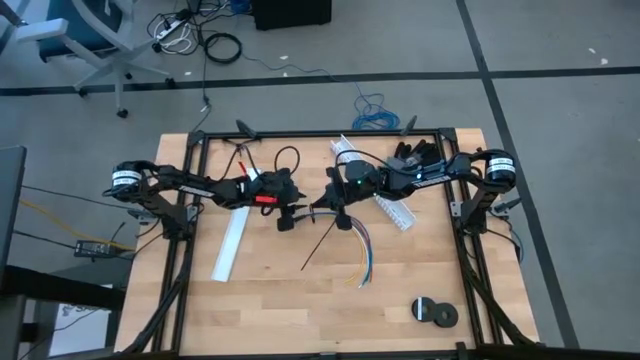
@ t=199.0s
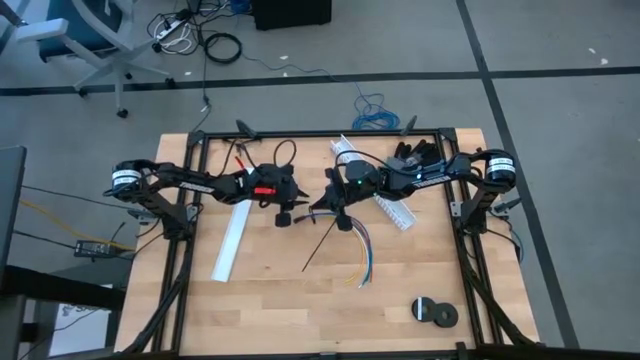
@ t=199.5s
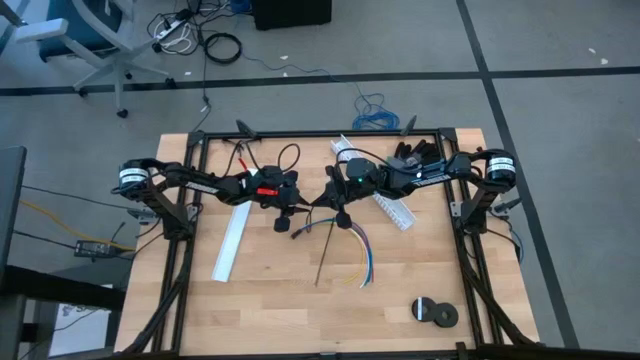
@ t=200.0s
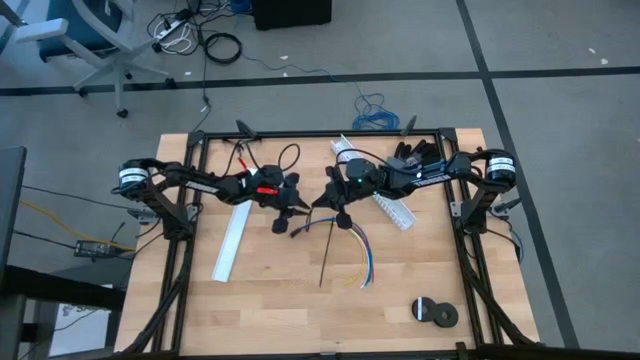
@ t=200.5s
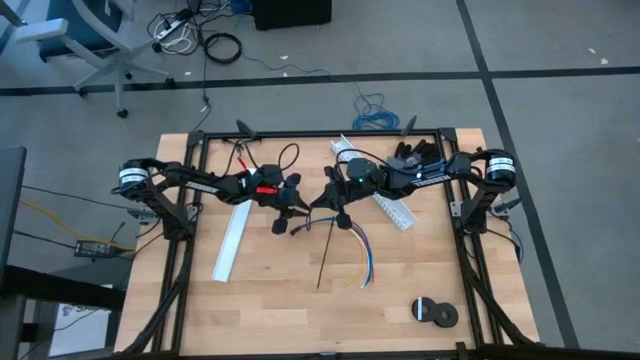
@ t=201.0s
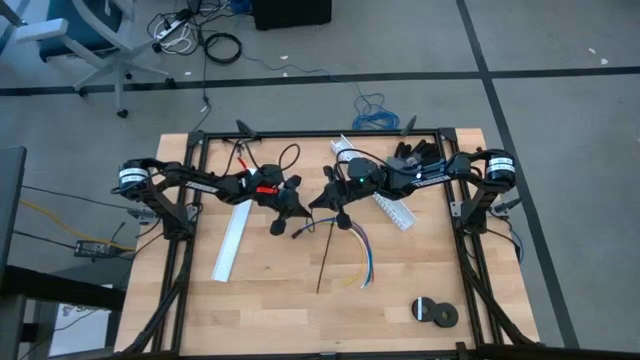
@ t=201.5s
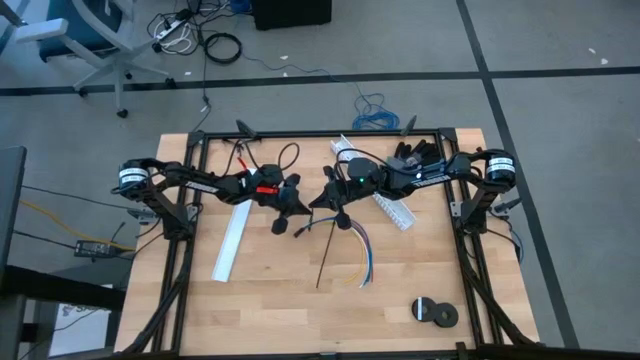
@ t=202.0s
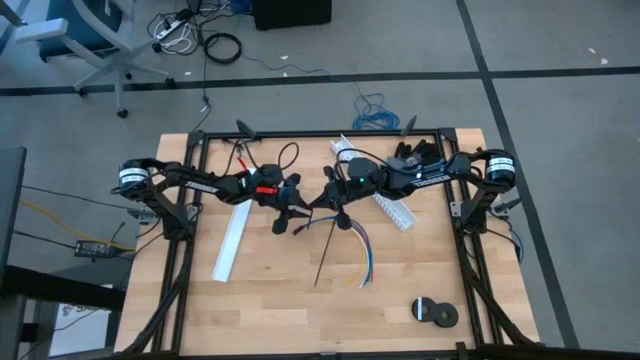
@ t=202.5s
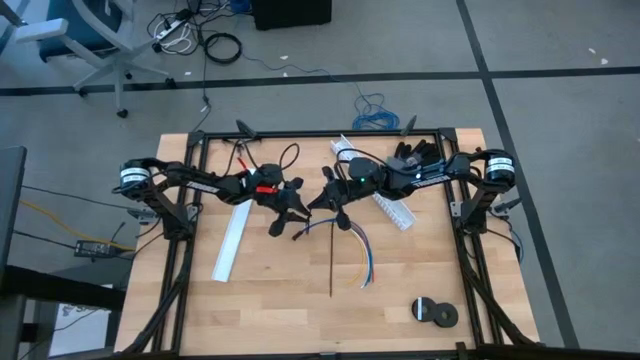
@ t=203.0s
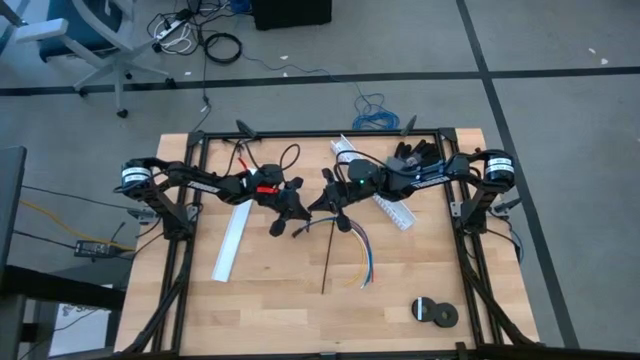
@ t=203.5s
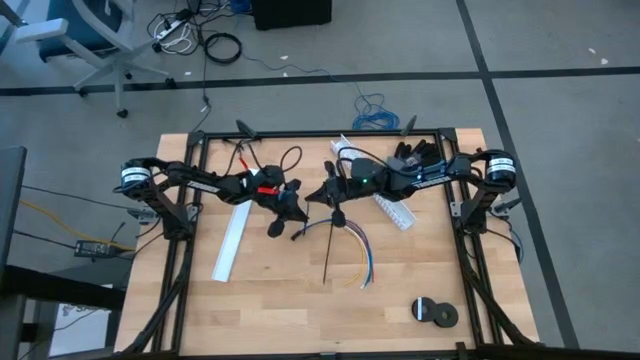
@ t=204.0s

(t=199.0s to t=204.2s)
Task: Ziptie cables
Wrap the cable wires with black zip tie

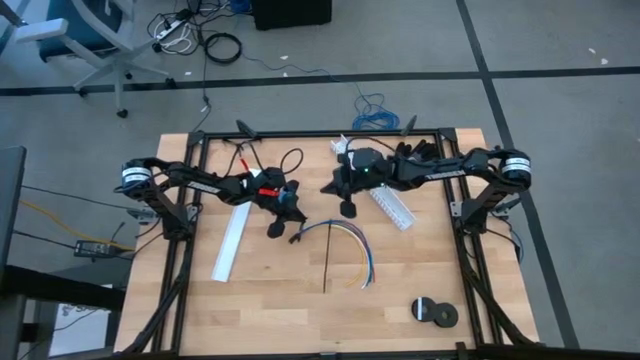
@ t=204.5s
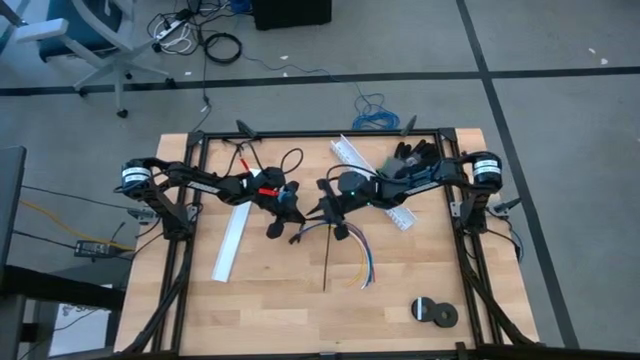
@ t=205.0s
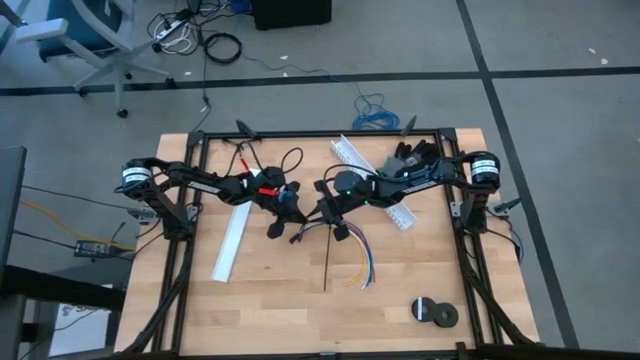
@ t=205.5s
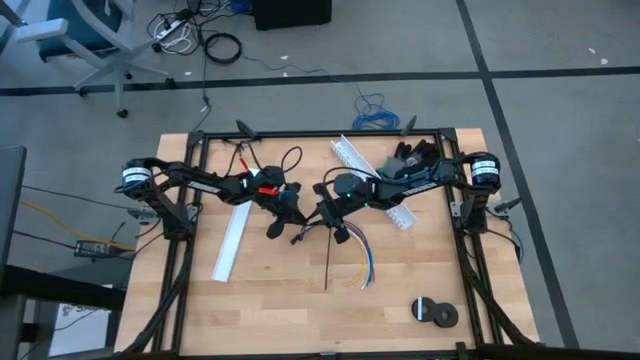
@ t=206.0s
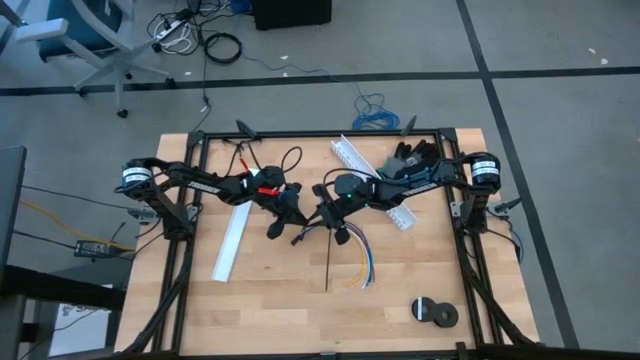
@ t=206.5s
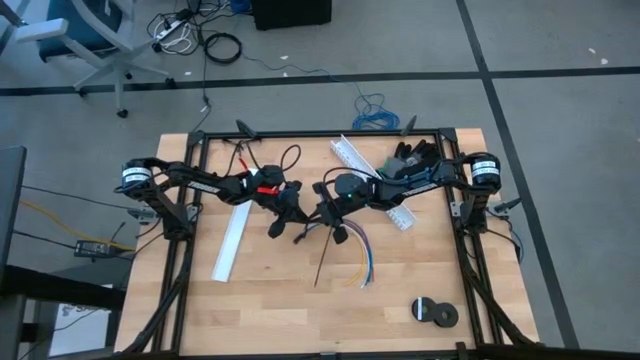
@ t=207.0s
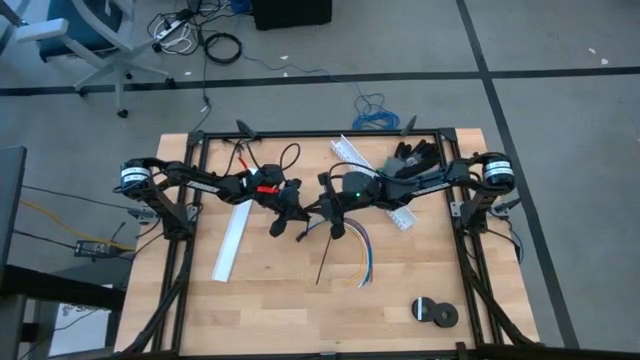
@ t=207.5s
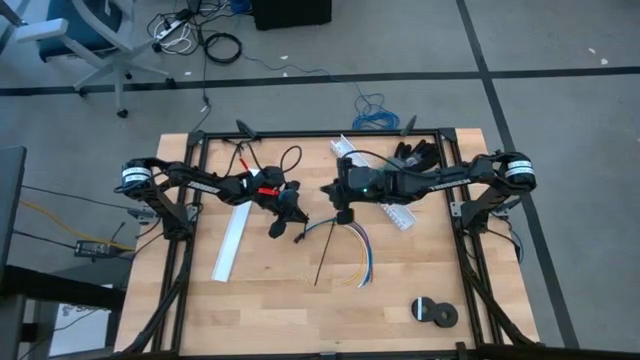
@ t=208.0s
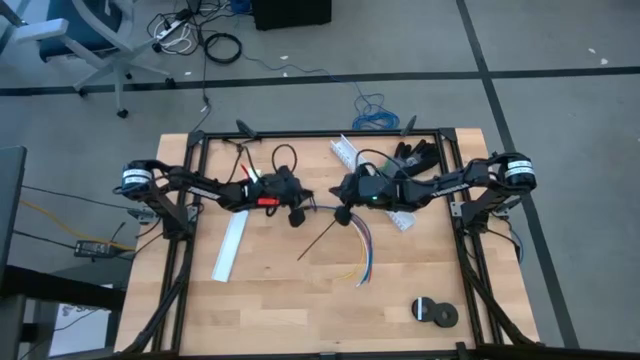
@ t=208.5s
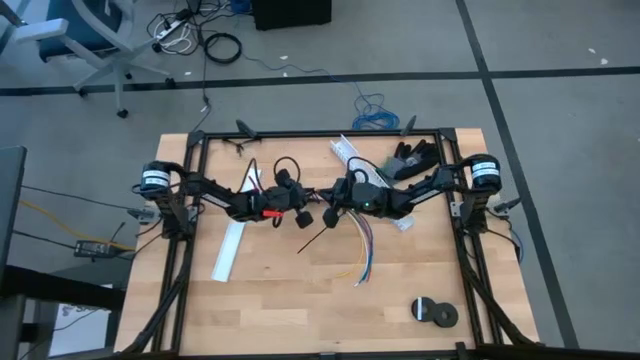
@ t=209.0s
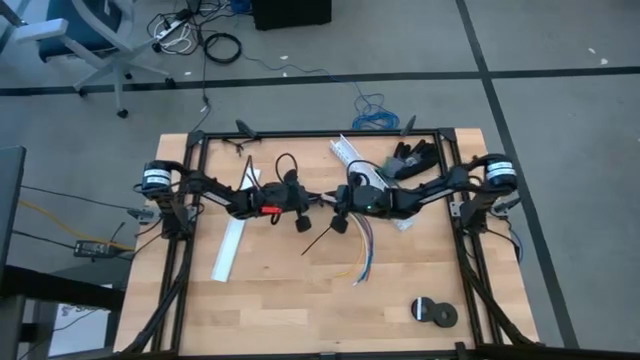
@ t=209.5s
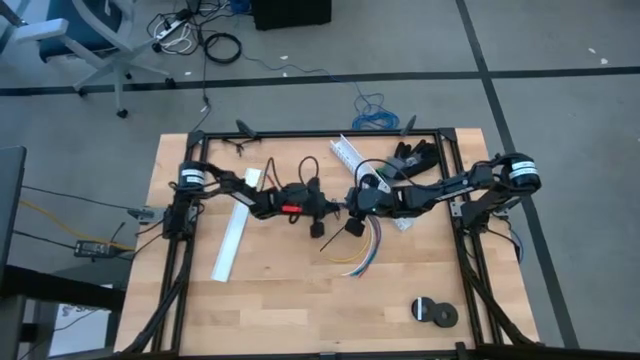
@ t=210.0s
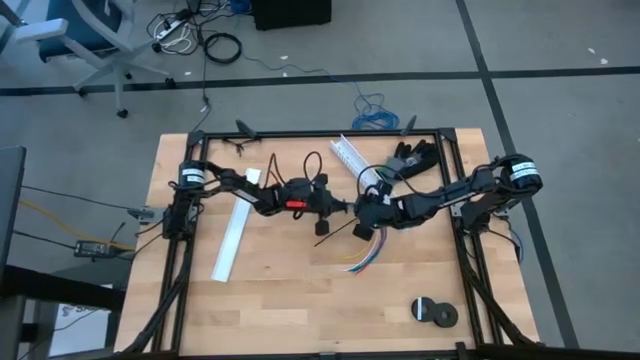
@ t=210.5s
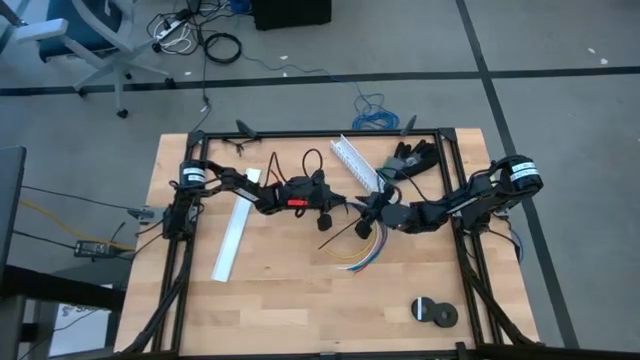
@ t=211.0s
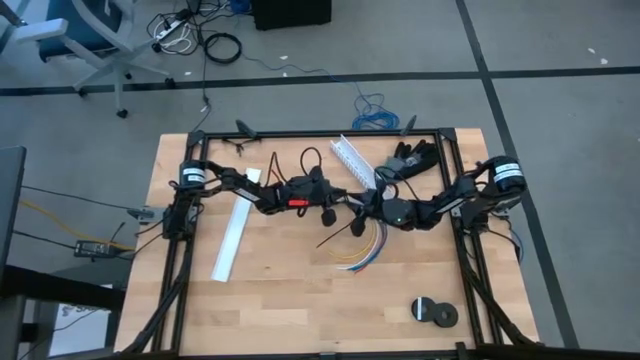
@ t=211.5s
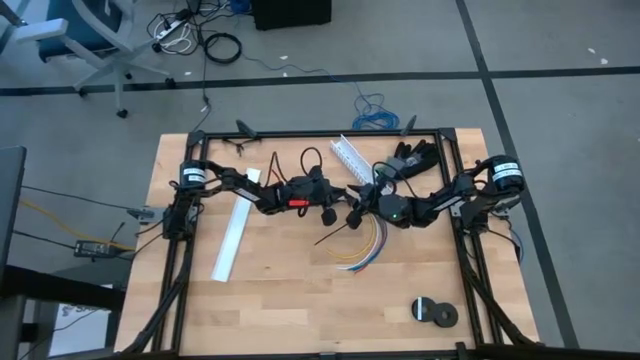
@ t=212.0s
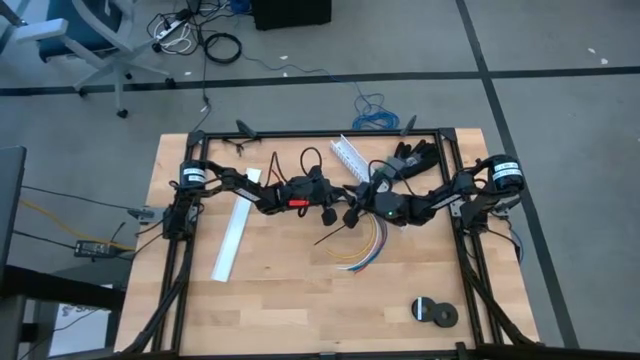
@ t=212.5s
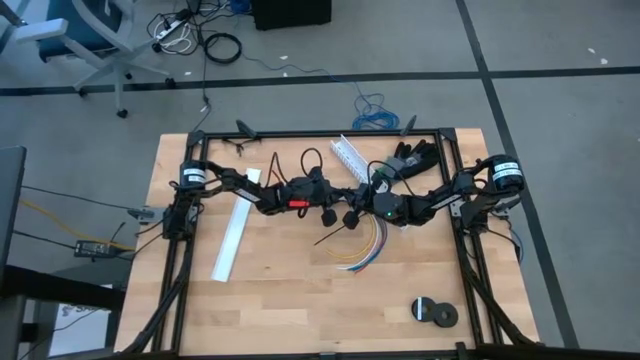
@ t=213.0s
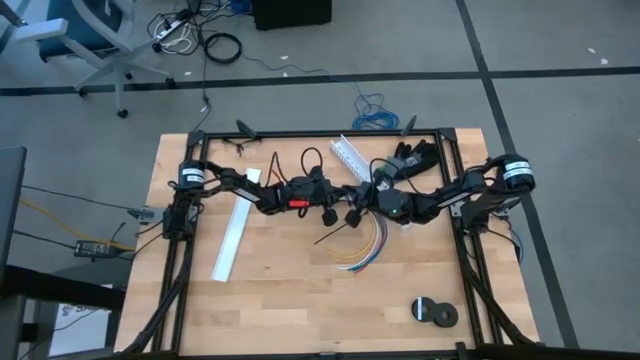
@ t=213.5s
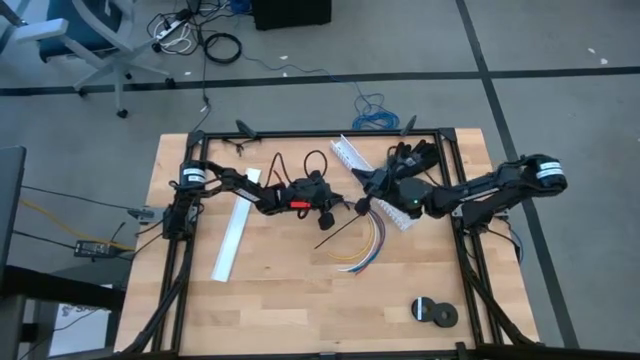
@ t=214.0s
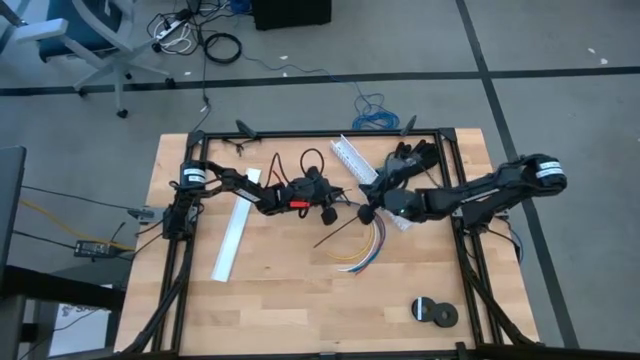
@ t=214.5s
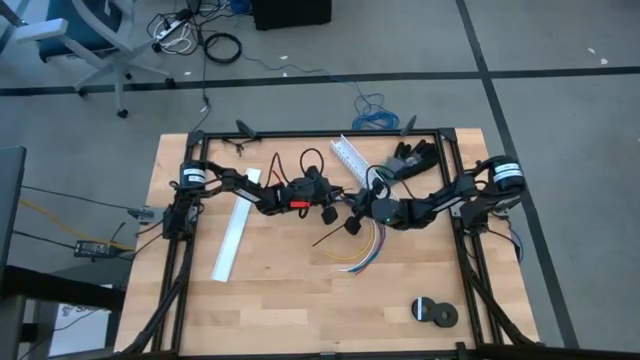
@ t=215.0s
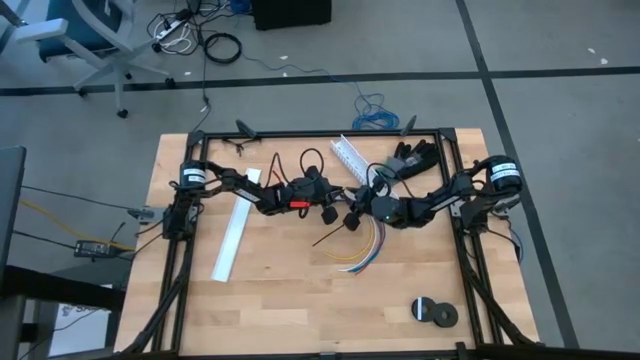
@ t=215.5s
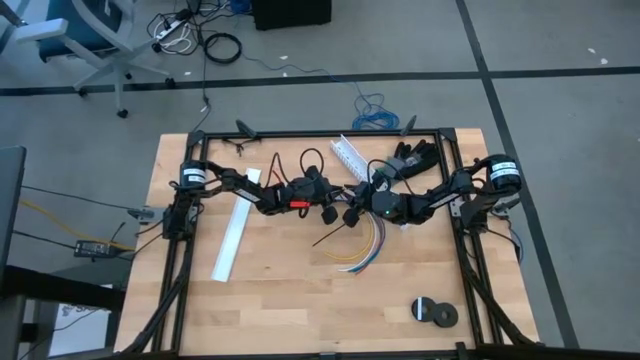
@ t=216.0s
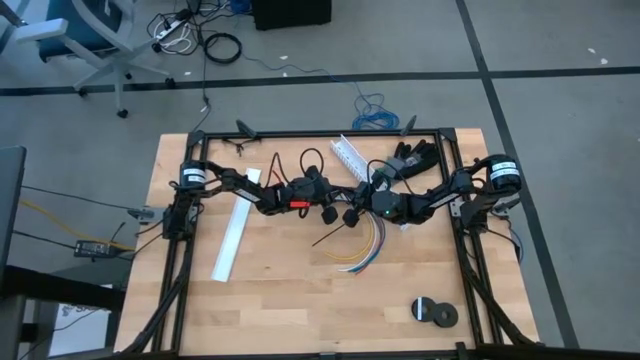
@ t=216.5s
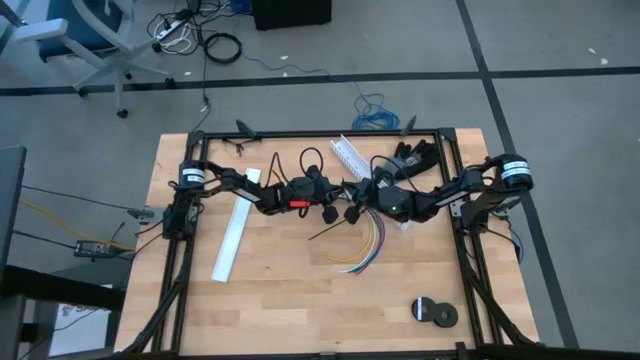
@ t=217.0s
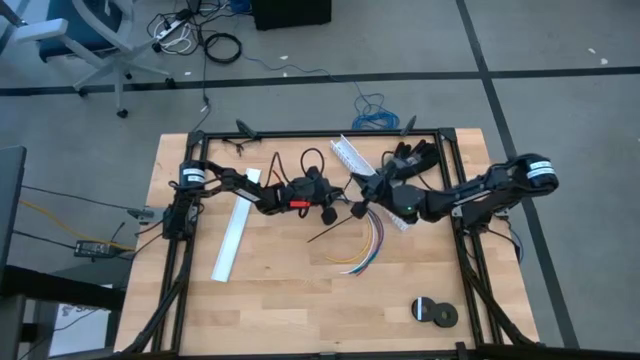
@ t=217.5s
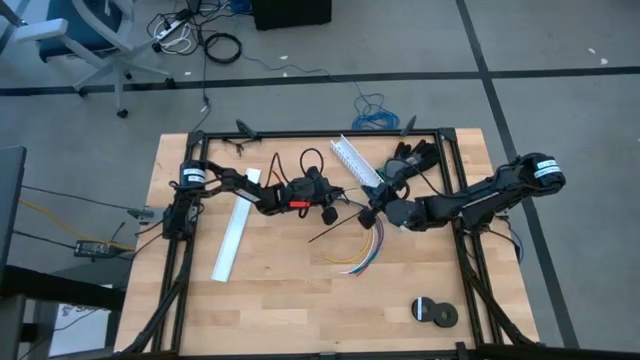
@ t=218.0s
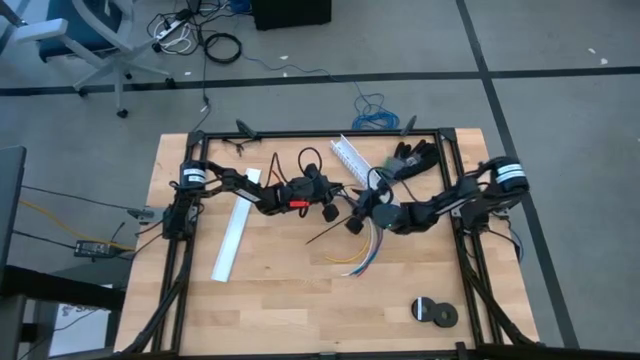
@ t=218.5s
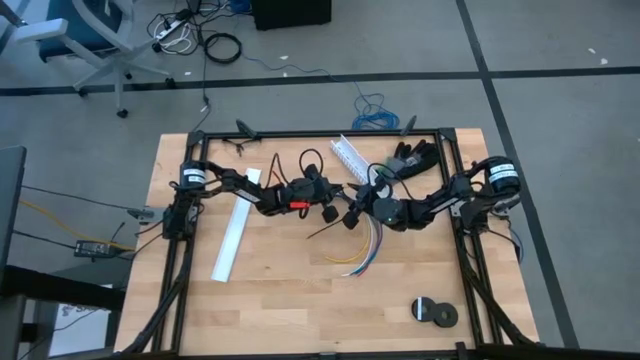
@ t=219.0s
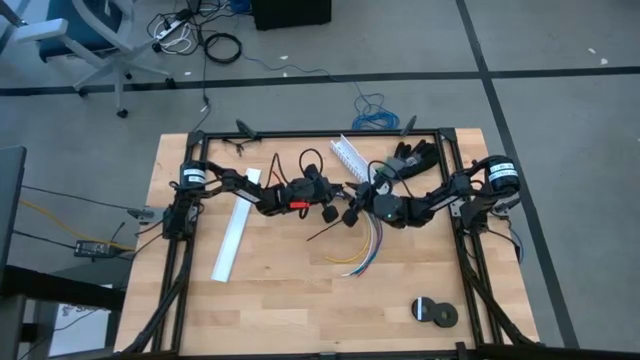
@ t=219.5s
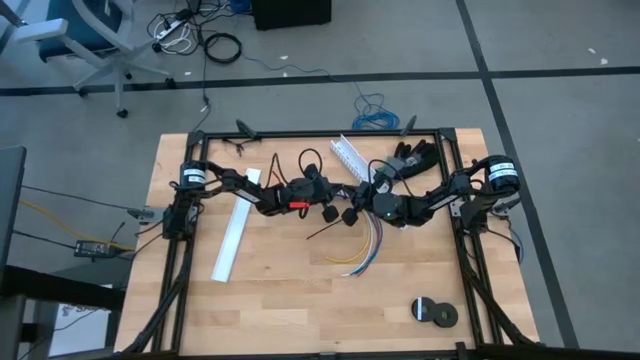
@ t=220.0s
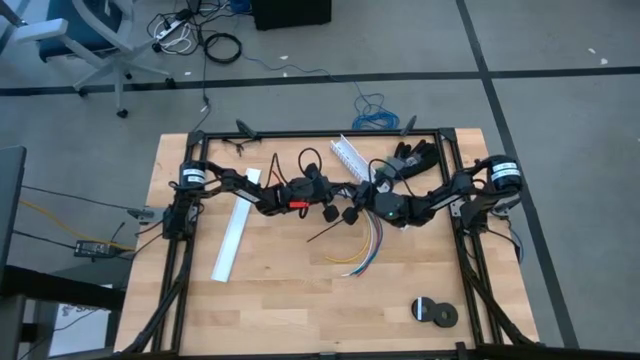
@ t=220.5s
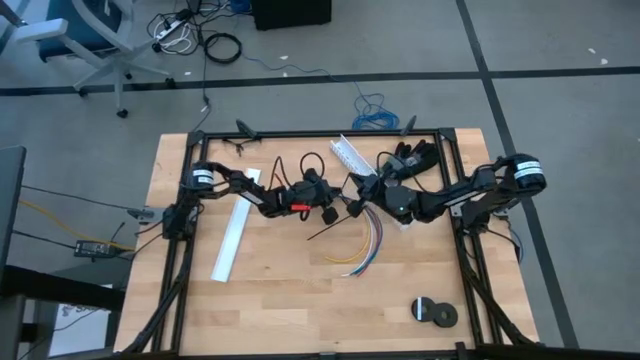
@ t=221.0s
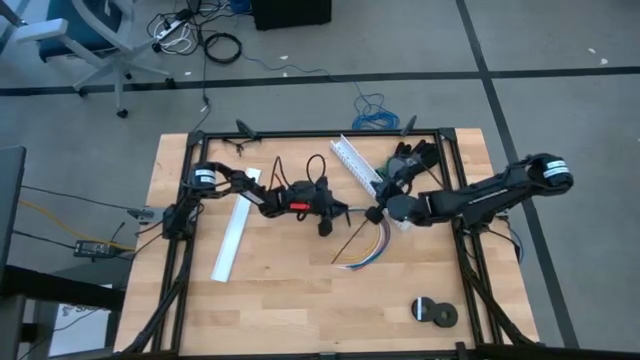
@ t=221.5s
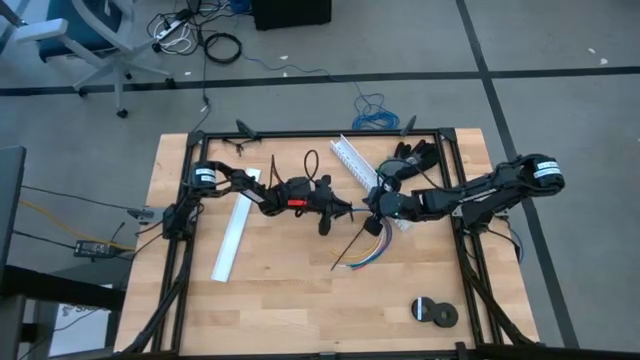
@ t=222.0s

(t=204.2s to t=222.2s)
Wrap the cable wires with black zip tie
